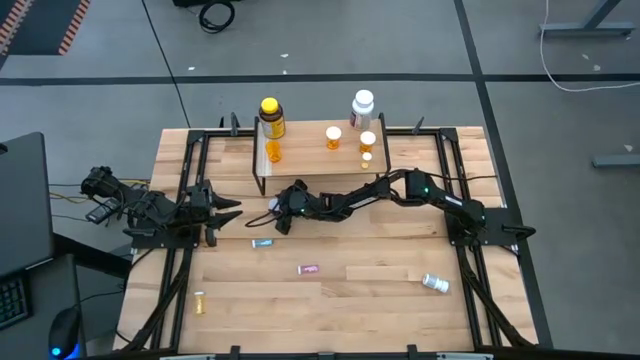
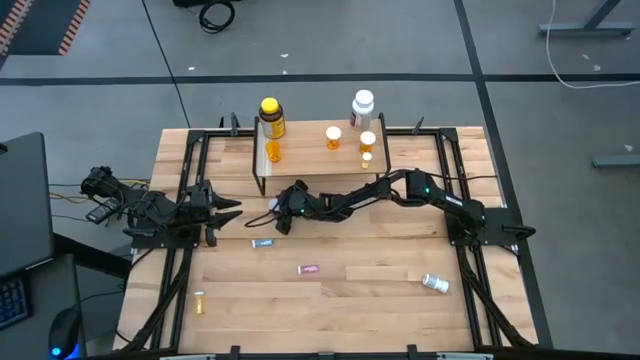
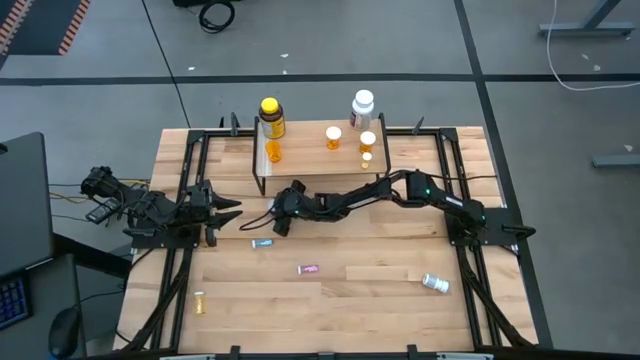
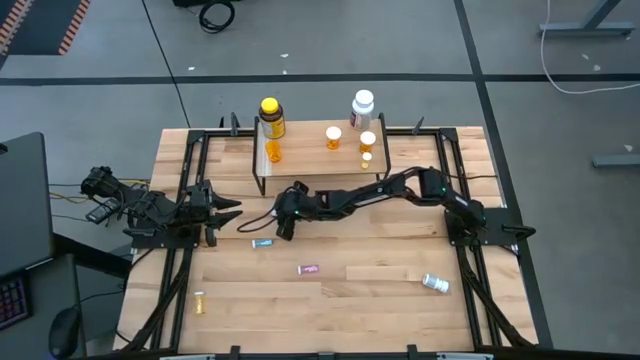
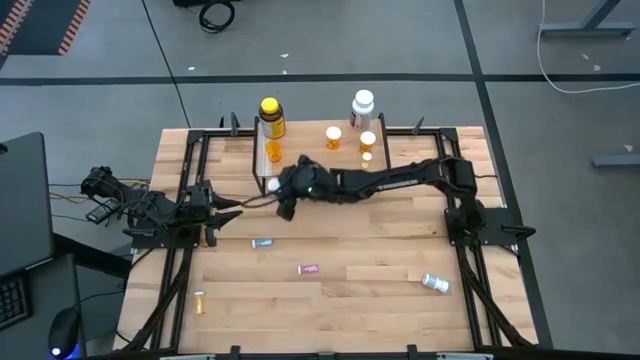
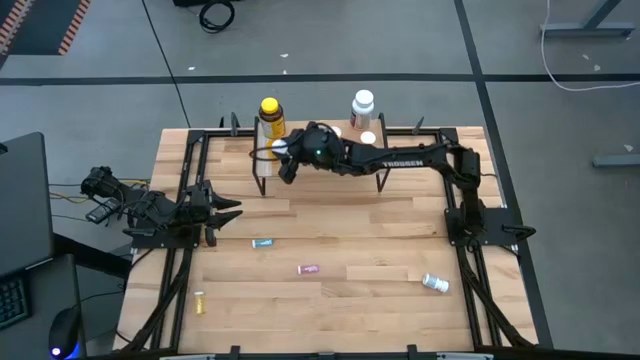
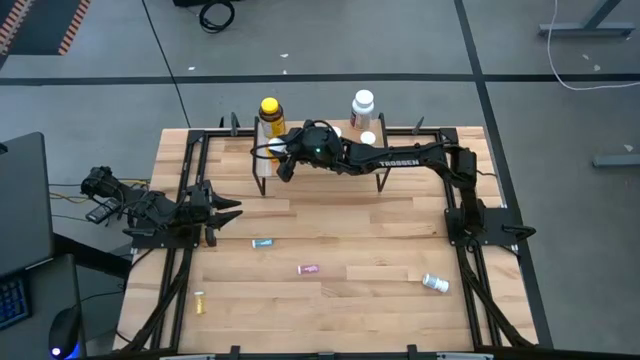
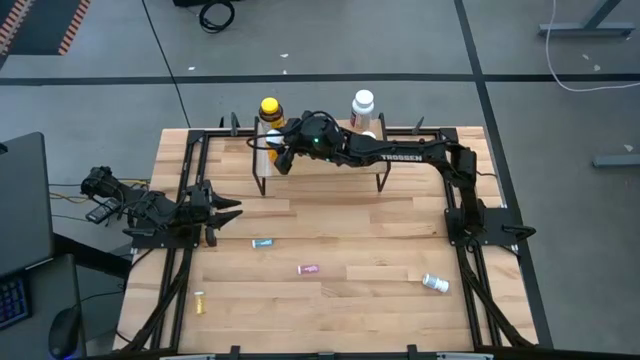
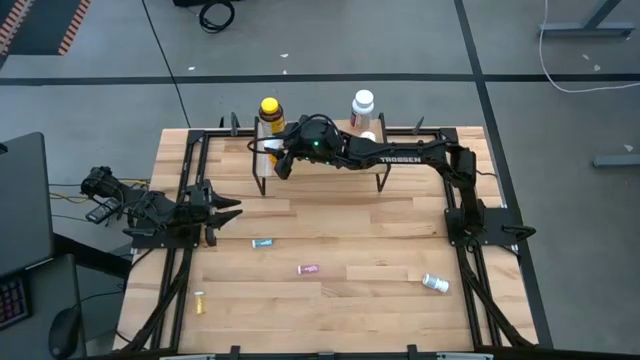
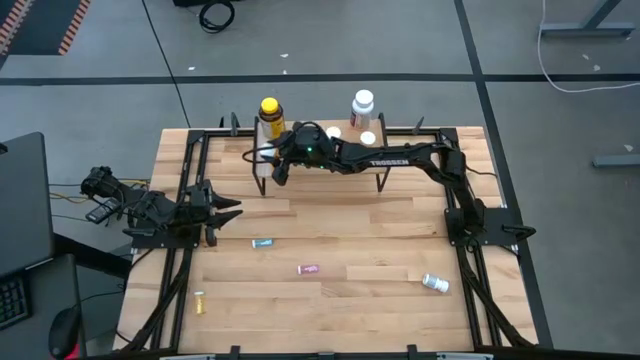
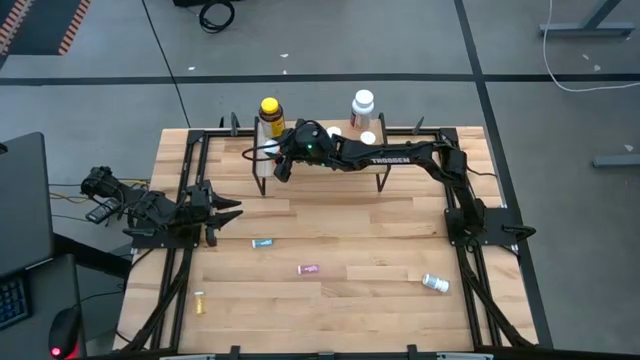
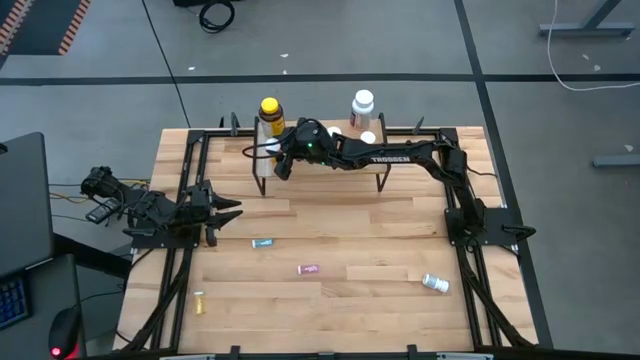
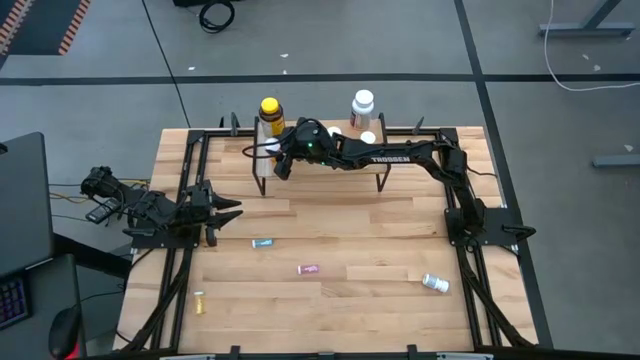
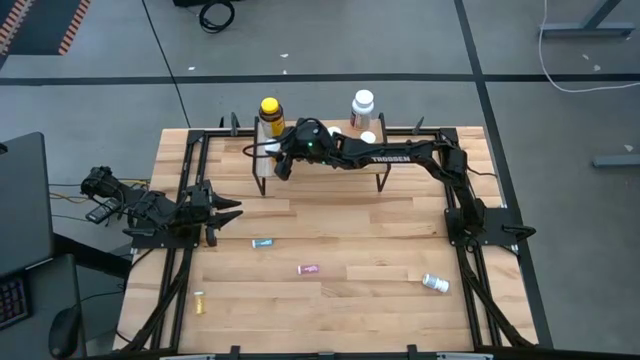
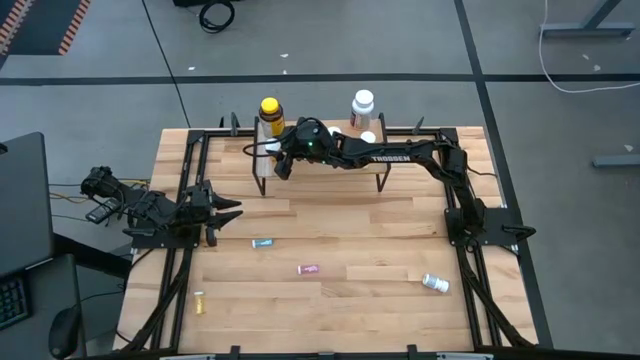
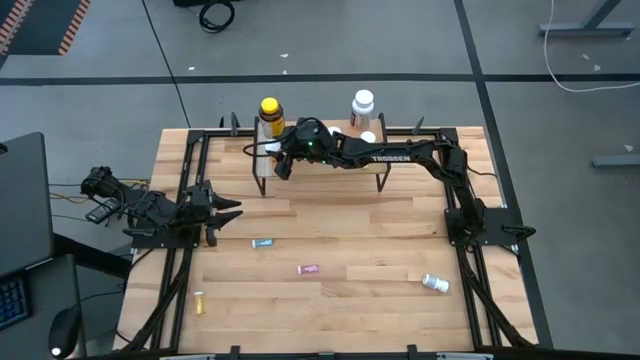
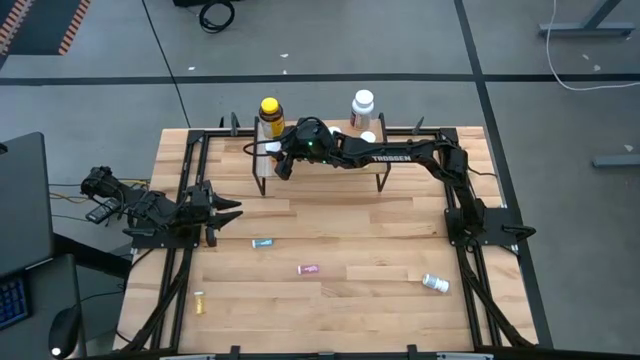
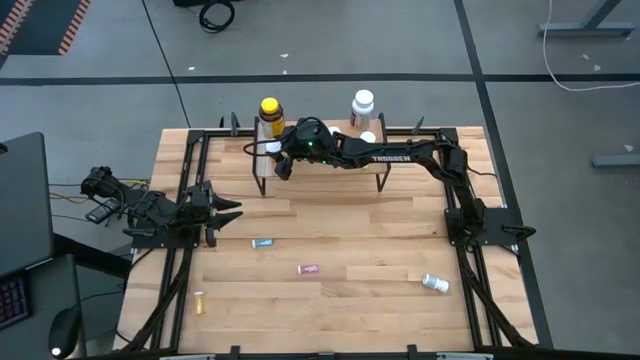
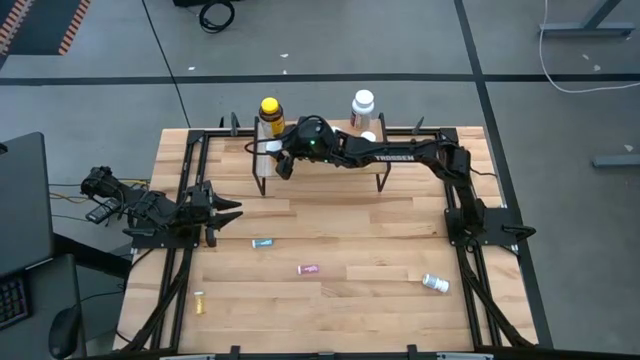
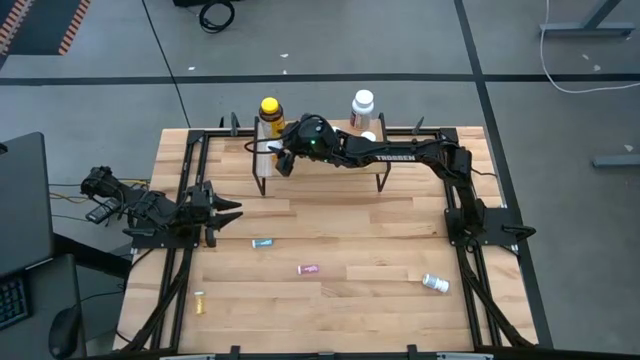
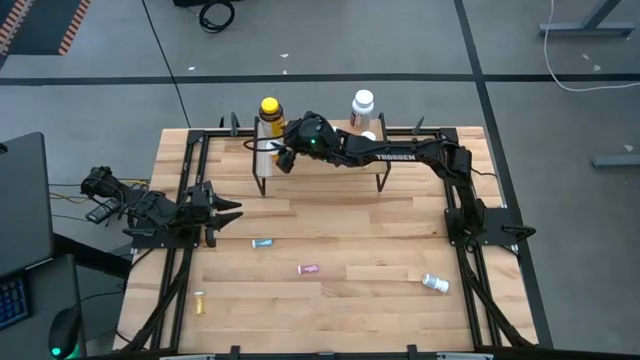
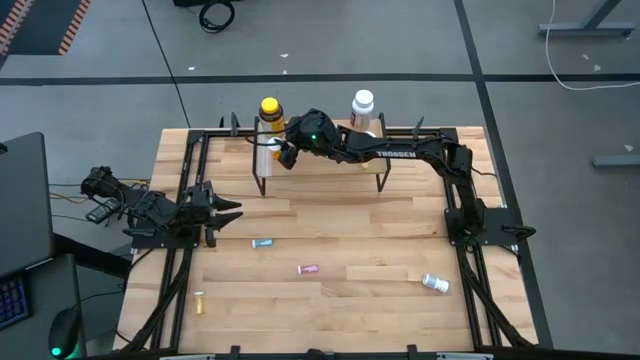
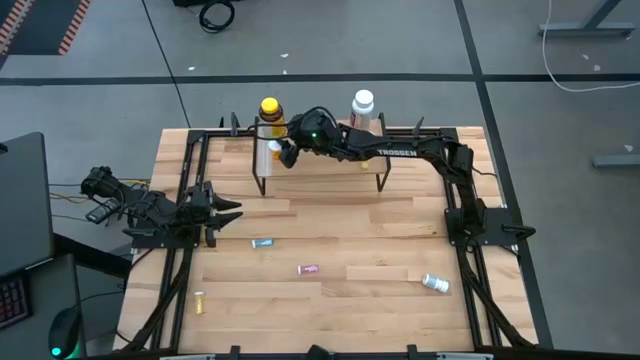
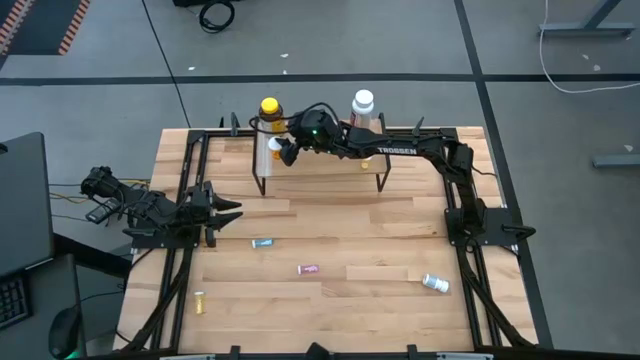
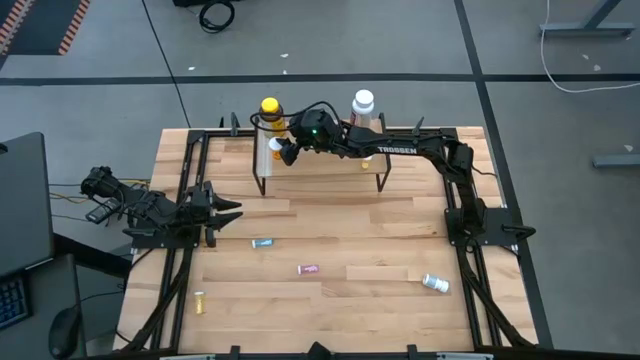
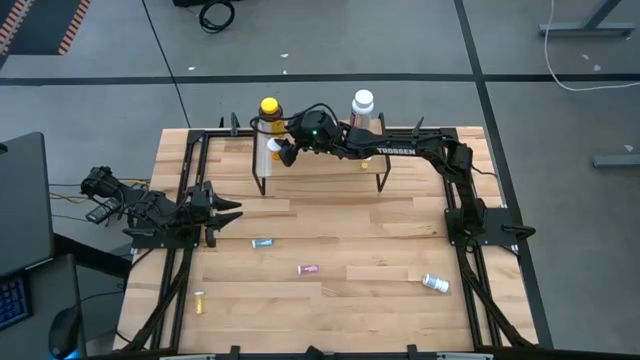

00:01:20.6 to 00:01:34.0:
Task: Pick and place medicine bottles onto shelf by color
Put the lid into the large orange pill bottle on the shelf

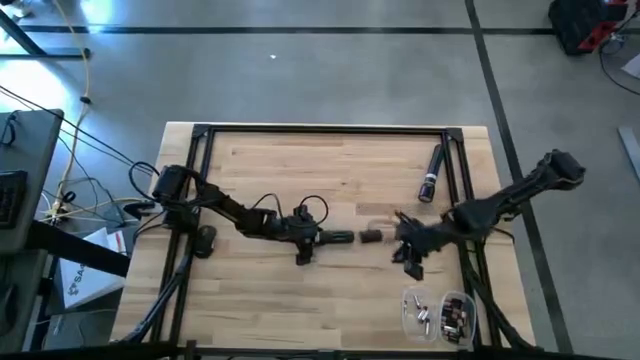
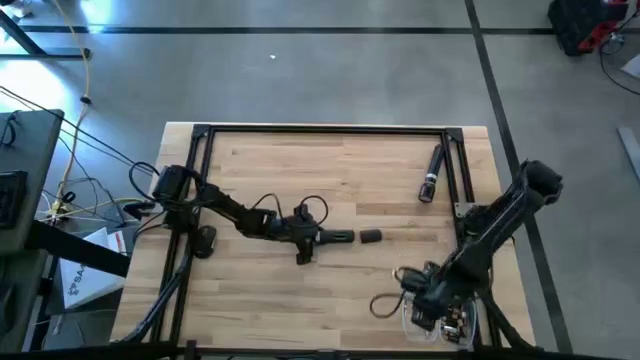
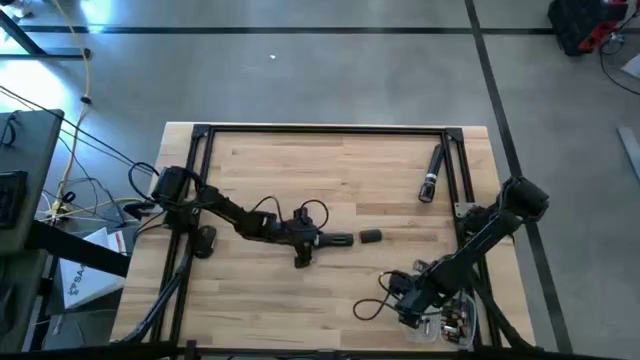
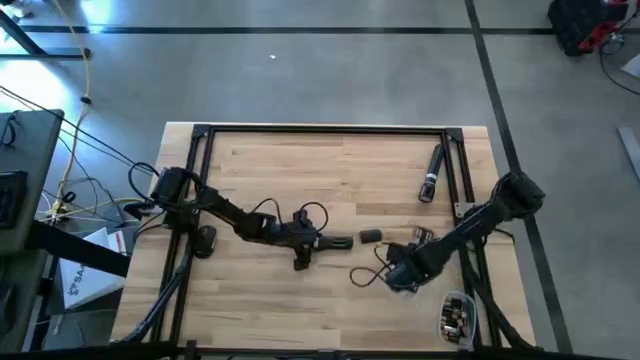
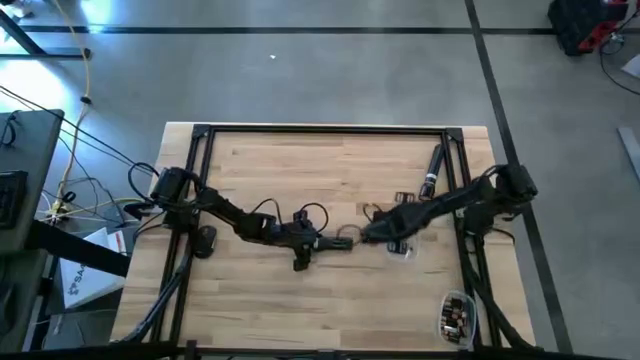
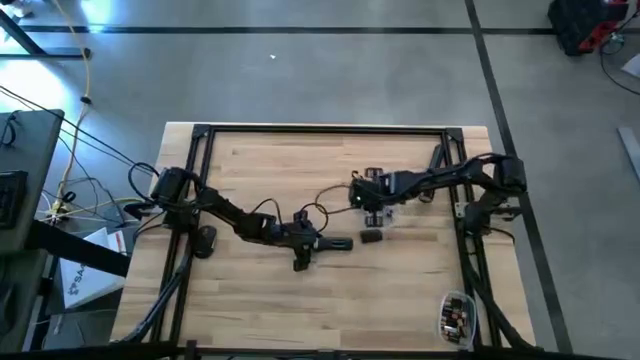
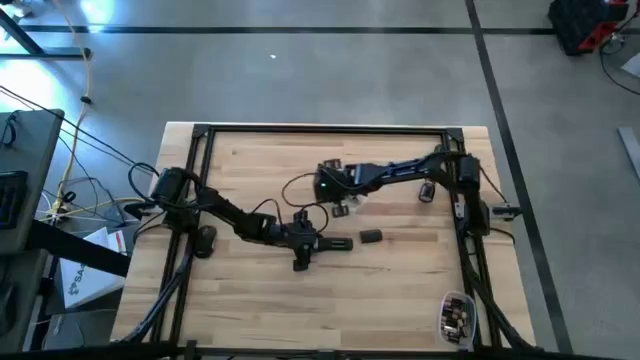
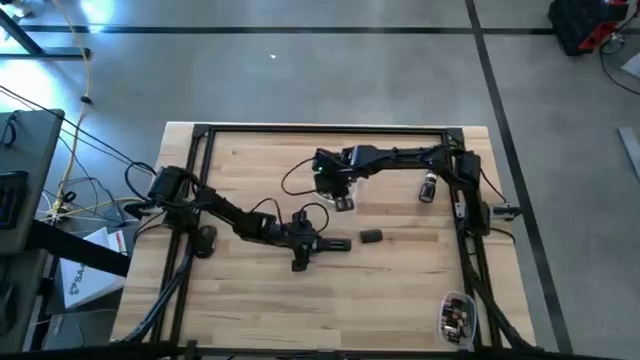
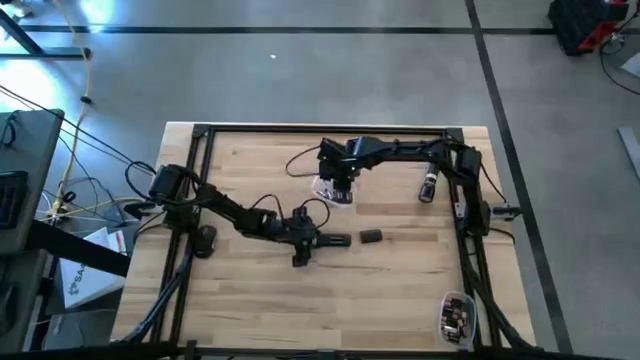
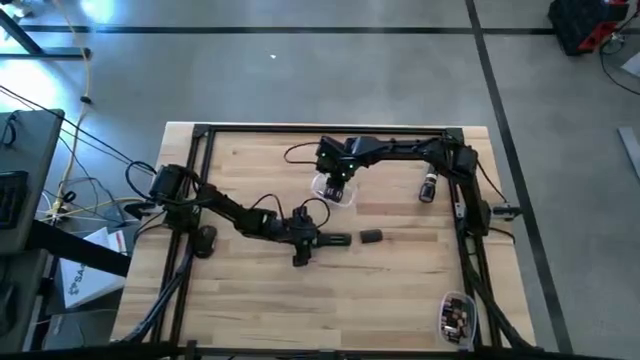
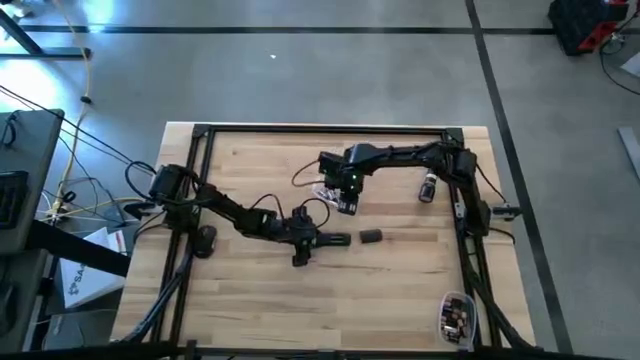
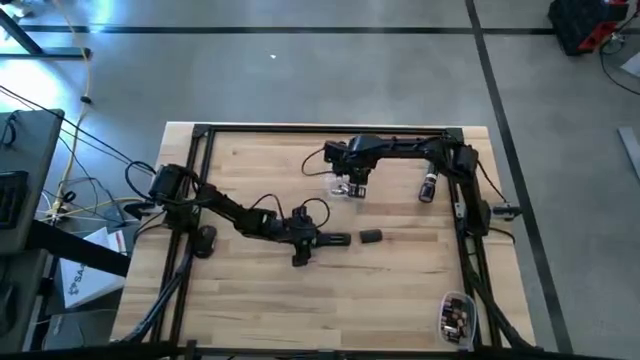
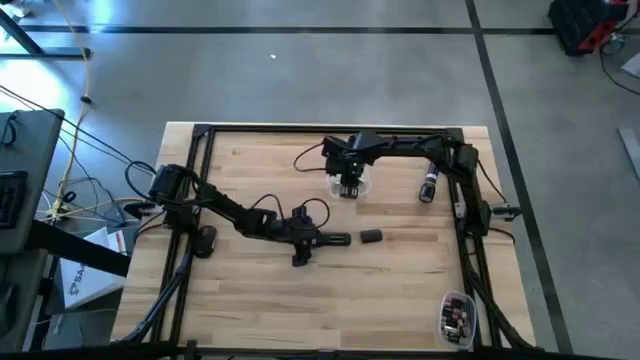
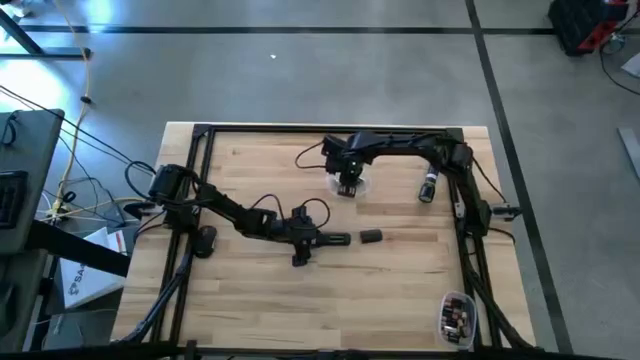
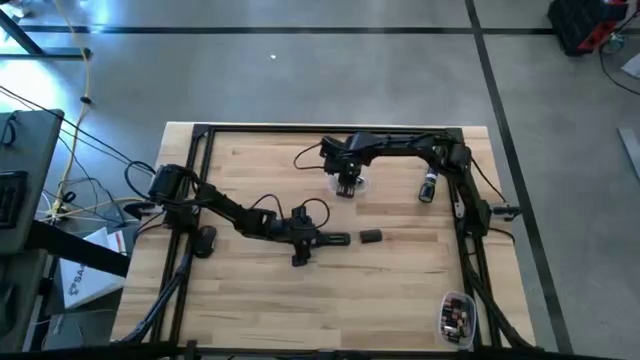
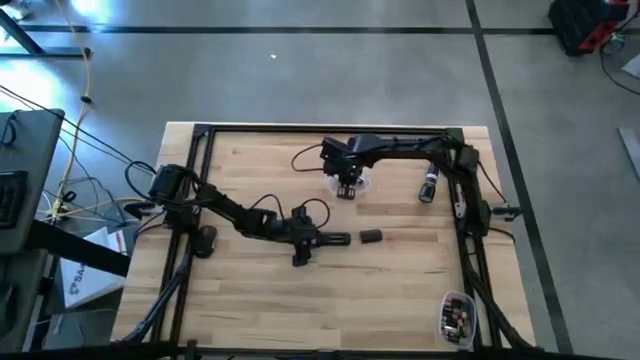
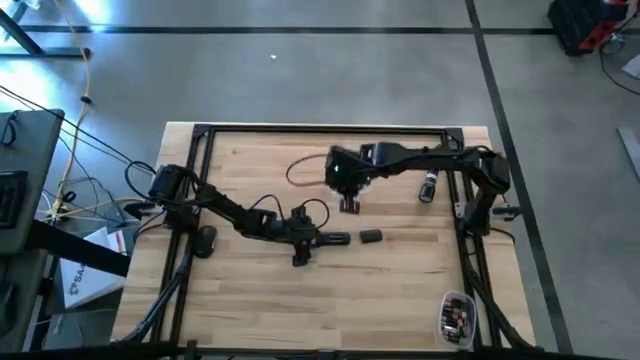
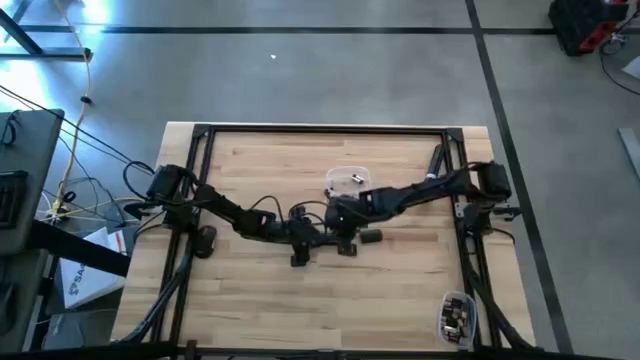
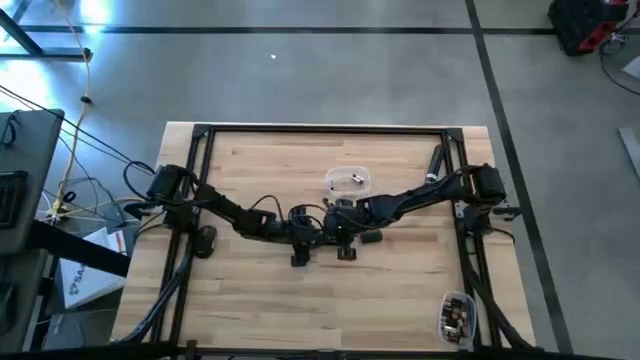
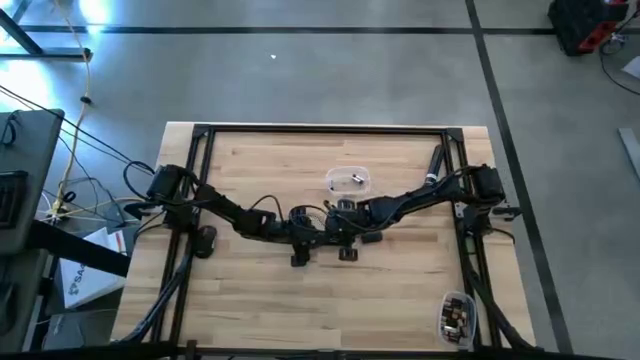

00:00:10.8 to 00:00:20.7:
Task: Insert battery
Insert the silver battery into the remote
